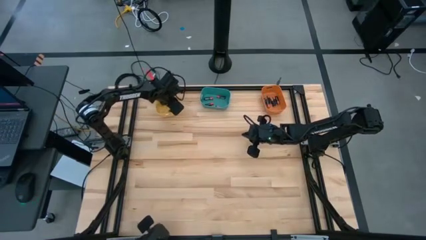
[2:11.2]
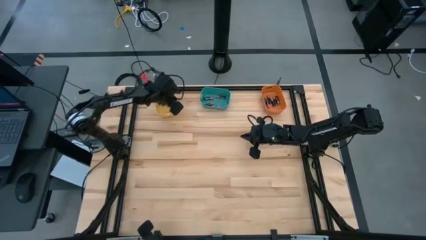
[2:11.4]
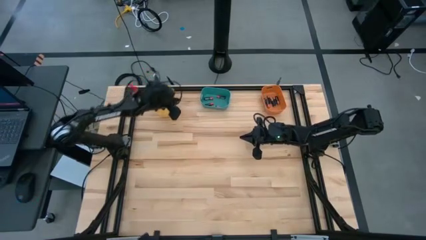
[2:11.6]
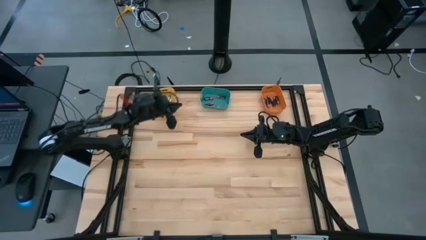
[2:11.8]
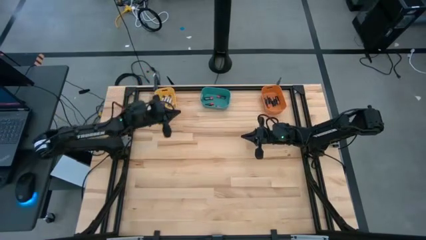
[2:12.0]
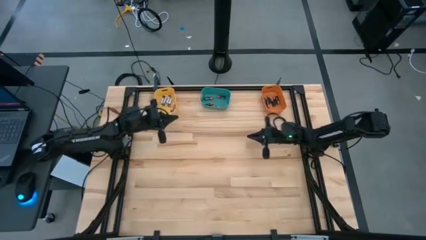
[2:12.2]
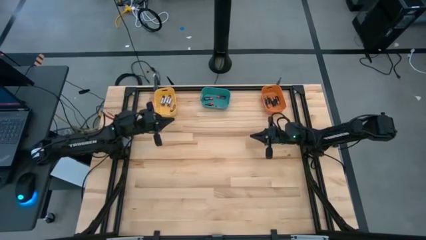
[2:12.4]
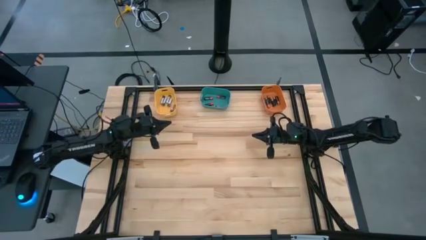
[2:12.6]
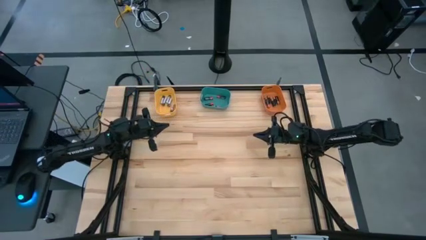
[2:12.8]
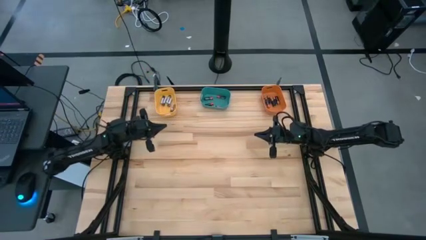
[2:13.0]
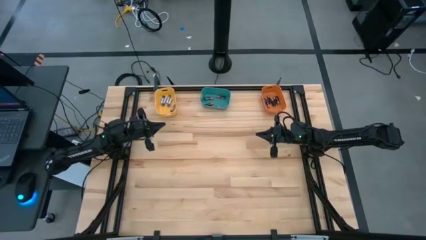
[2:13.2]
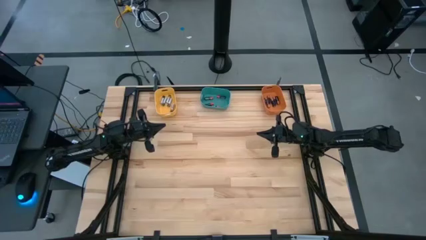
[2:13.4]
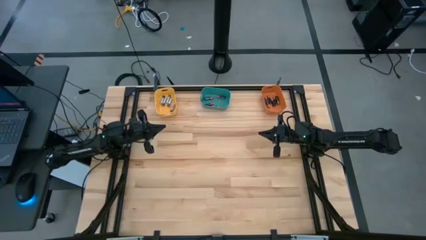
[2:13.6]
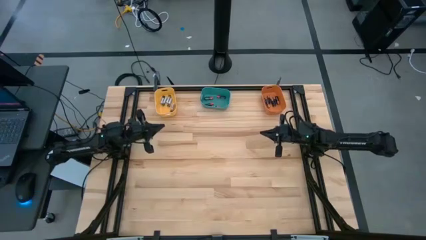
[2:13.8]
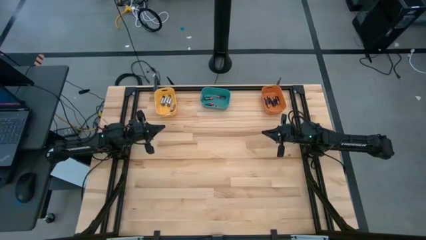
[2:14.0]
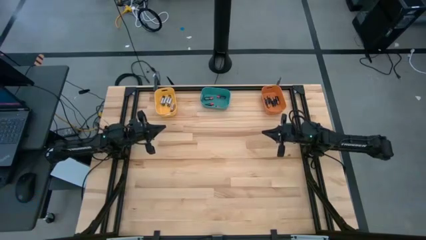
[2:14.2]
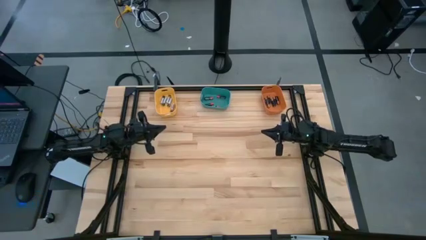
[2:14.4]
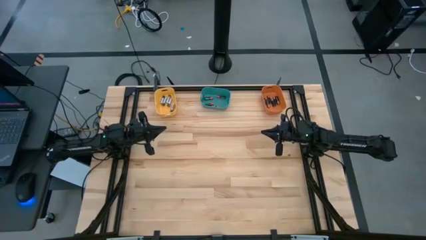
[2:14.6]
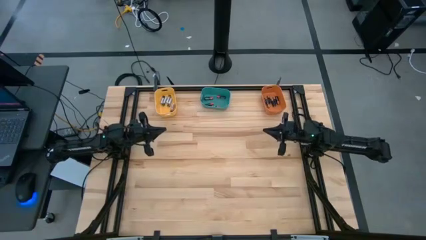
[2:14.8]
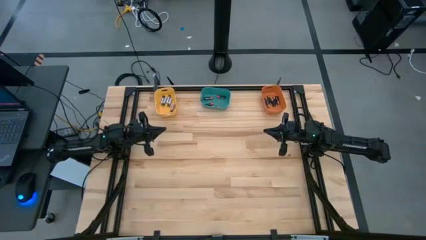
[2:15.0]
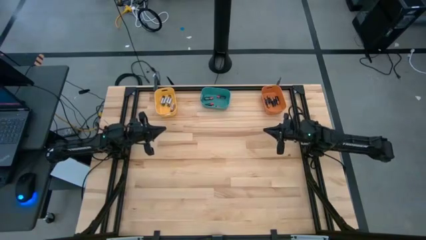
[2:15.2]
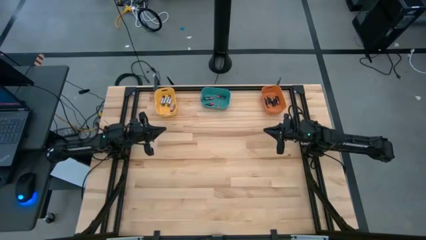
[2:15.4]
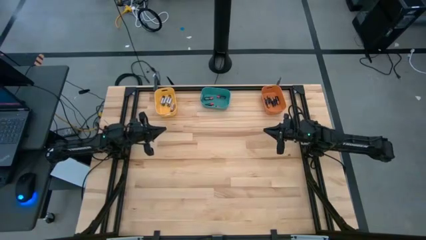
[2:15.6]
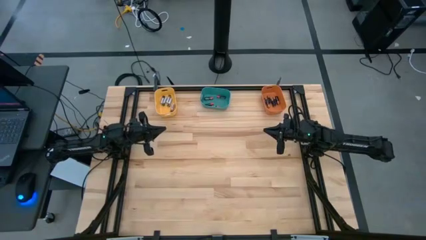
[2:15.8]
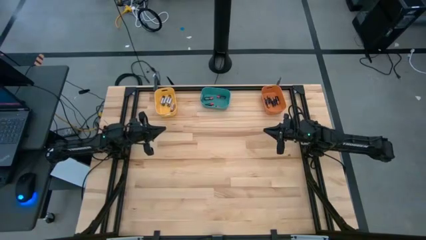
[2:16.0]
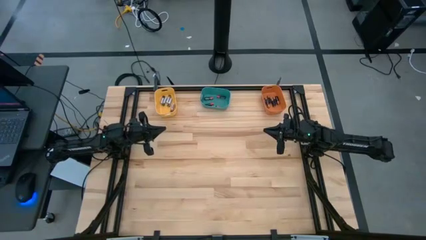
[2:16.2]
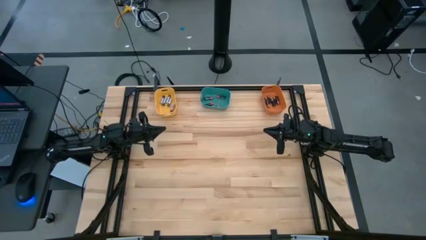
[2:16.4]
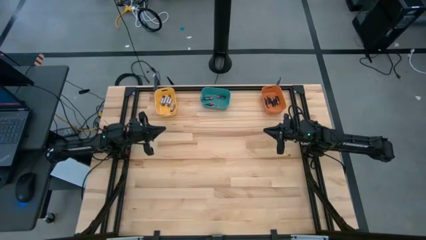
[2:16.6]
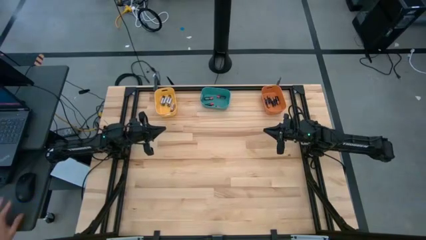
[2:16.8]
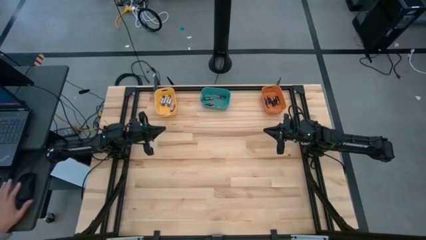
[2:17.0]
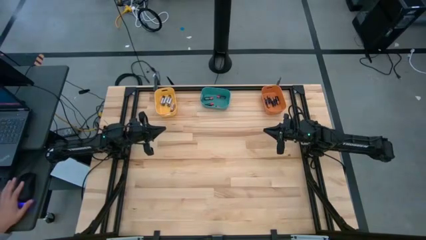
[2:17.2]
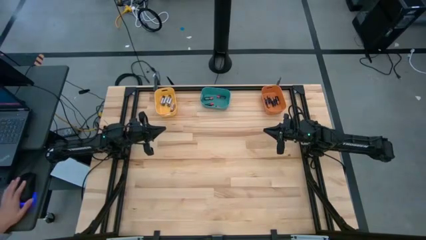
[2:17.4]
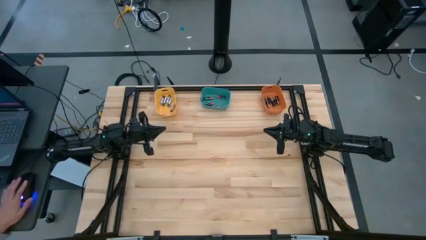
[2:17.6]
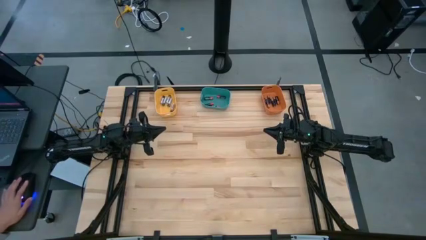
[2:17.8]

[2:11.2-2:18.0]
Task: Sort batteries
Return to Home Position

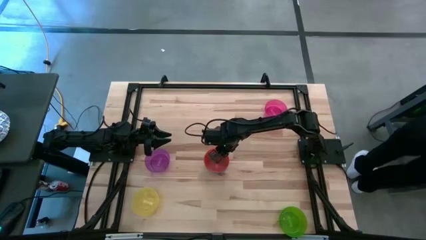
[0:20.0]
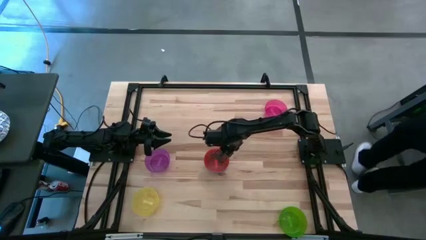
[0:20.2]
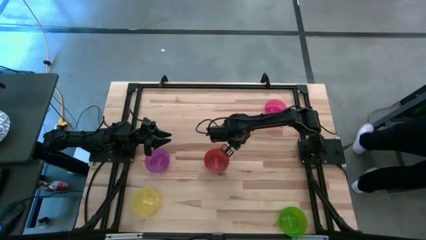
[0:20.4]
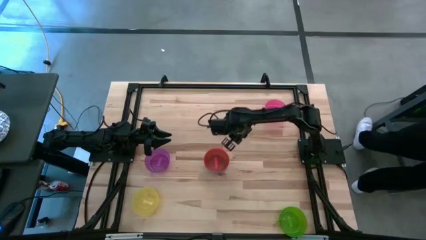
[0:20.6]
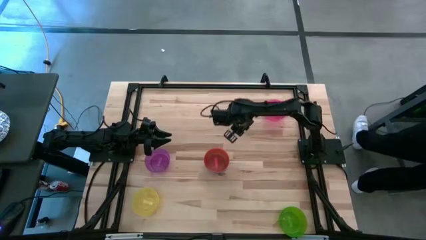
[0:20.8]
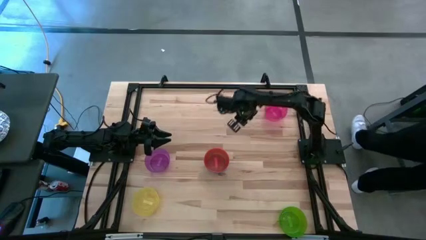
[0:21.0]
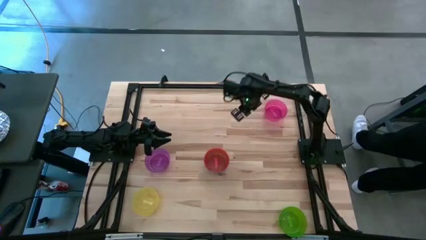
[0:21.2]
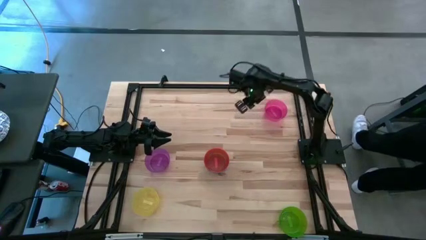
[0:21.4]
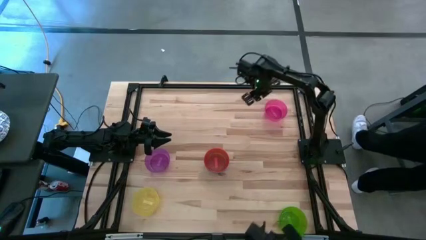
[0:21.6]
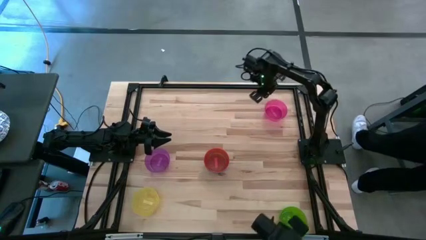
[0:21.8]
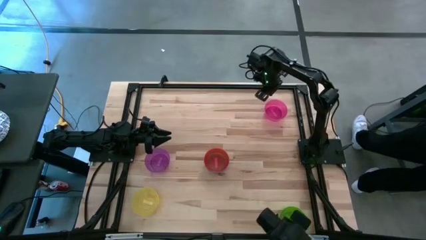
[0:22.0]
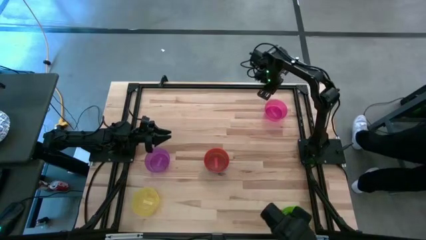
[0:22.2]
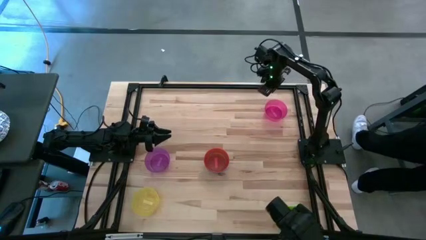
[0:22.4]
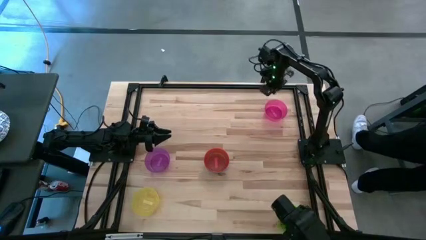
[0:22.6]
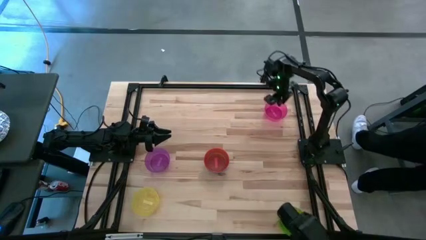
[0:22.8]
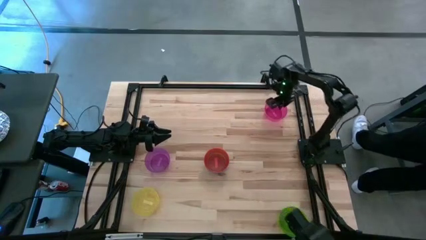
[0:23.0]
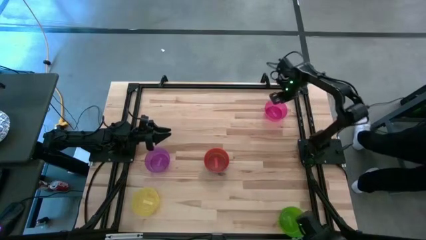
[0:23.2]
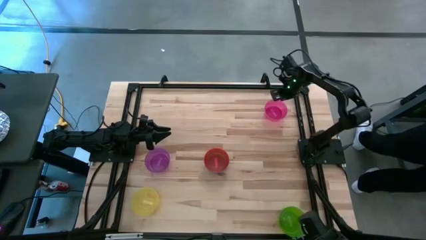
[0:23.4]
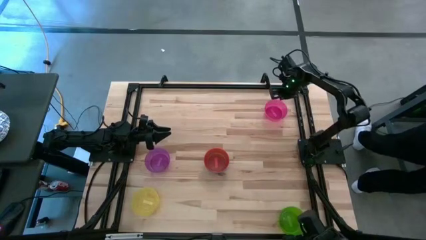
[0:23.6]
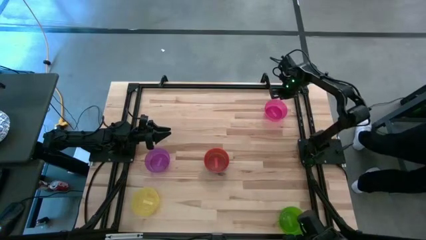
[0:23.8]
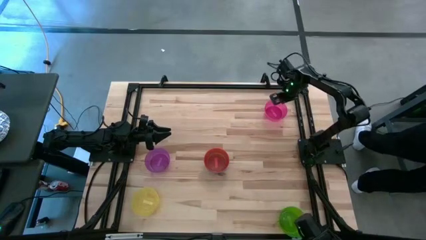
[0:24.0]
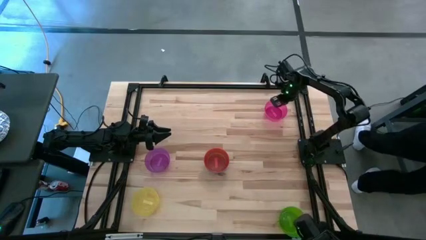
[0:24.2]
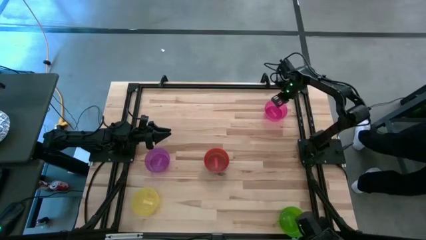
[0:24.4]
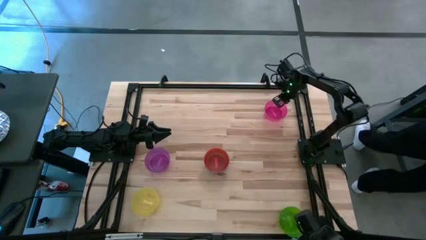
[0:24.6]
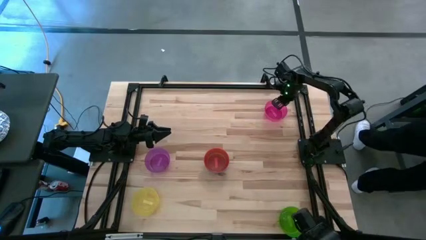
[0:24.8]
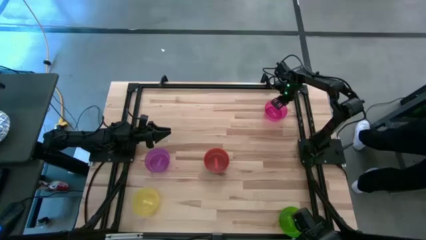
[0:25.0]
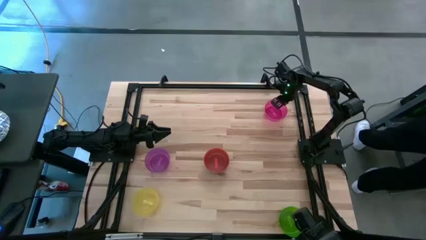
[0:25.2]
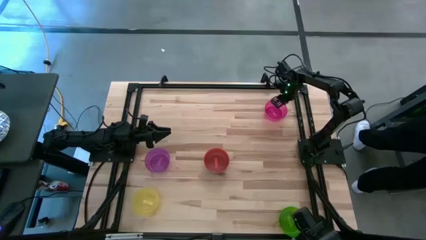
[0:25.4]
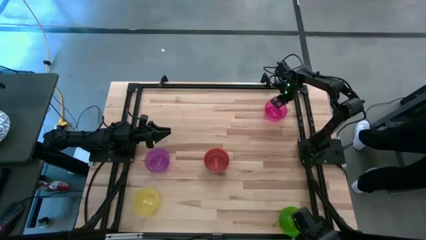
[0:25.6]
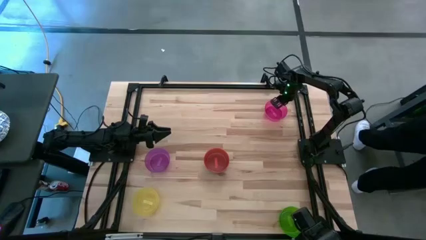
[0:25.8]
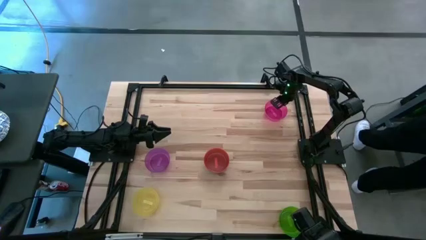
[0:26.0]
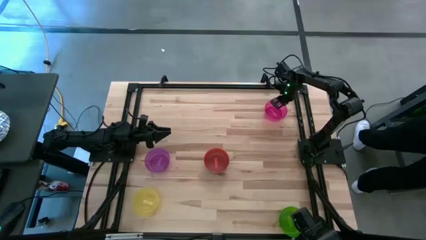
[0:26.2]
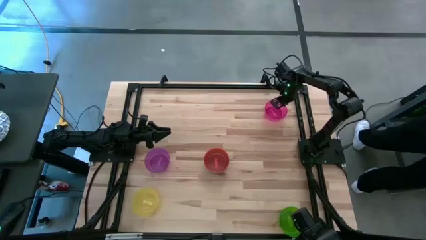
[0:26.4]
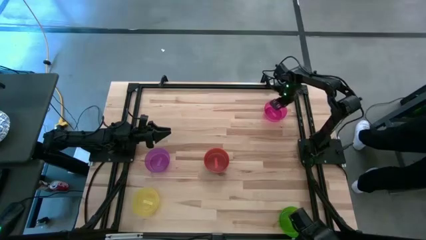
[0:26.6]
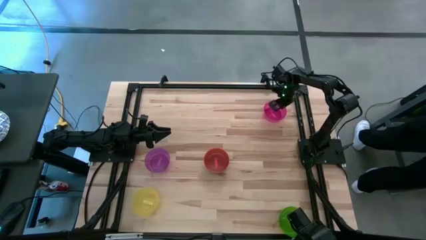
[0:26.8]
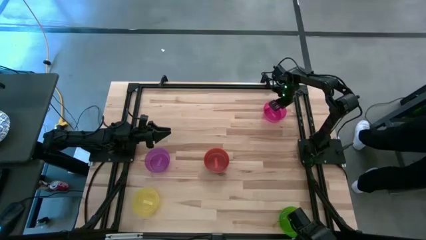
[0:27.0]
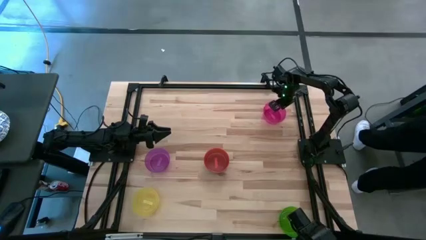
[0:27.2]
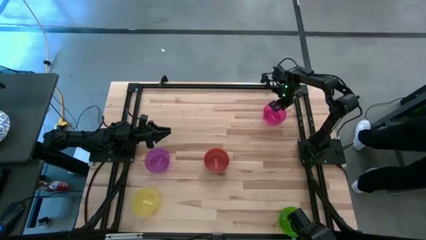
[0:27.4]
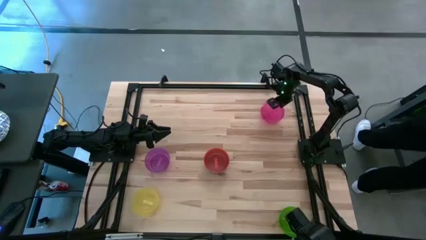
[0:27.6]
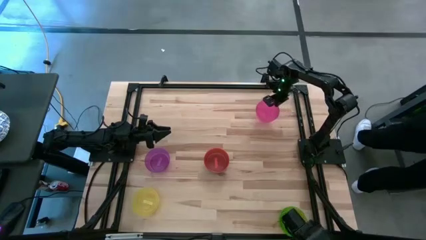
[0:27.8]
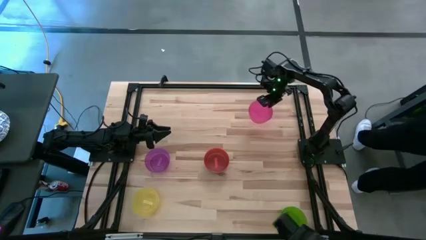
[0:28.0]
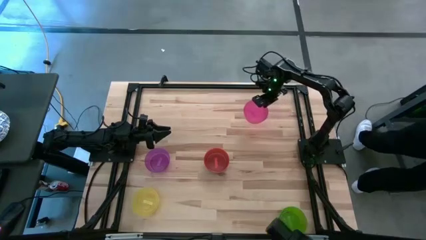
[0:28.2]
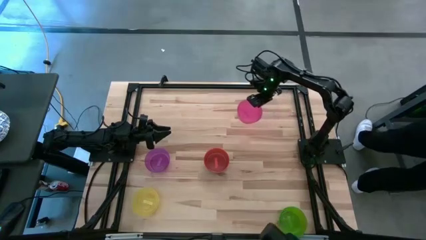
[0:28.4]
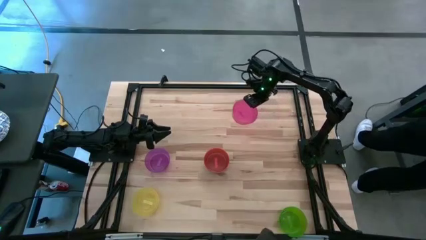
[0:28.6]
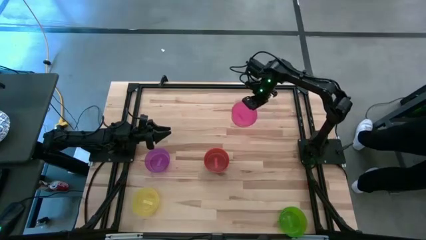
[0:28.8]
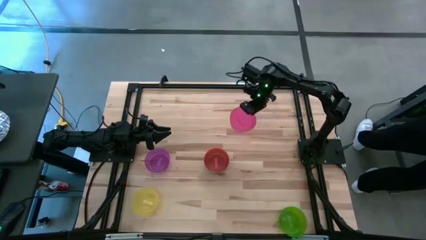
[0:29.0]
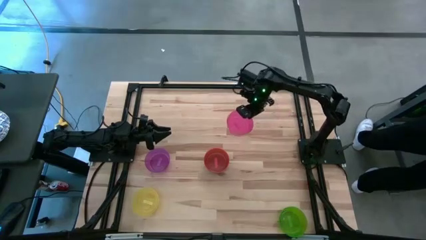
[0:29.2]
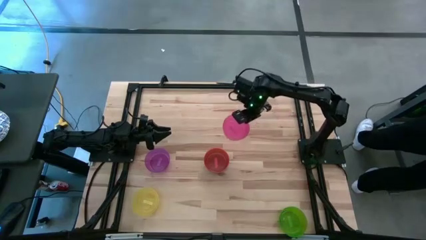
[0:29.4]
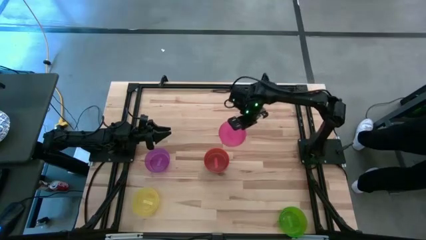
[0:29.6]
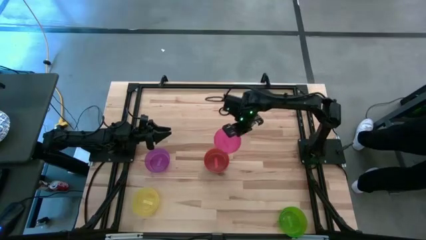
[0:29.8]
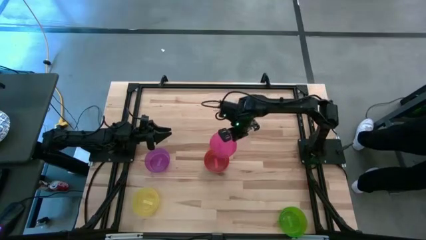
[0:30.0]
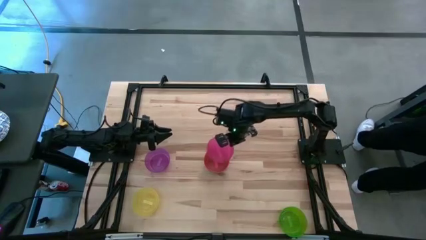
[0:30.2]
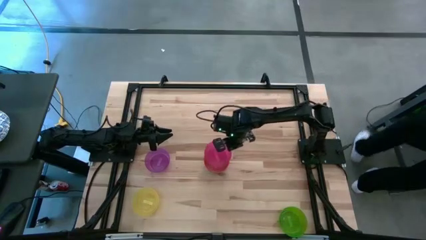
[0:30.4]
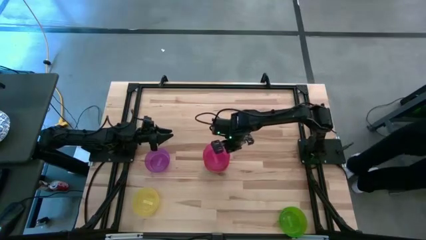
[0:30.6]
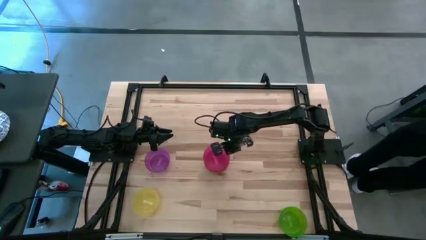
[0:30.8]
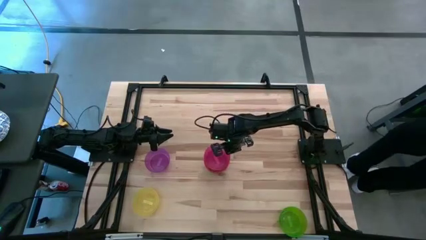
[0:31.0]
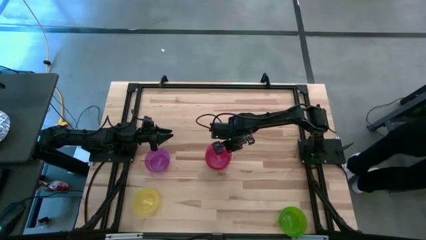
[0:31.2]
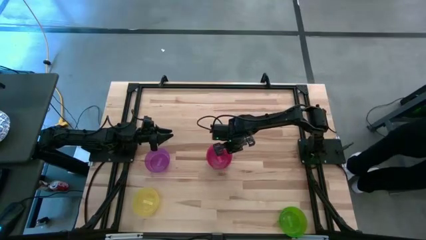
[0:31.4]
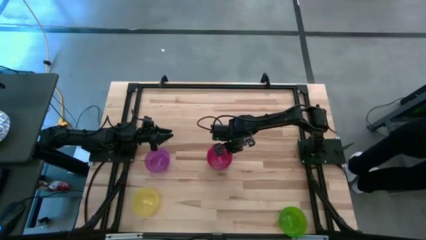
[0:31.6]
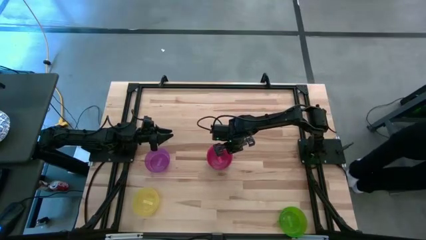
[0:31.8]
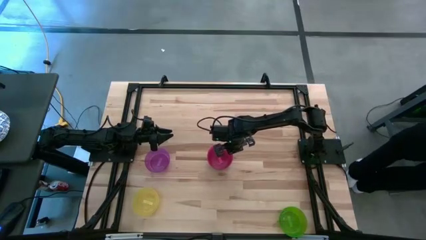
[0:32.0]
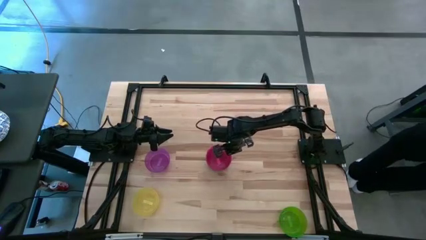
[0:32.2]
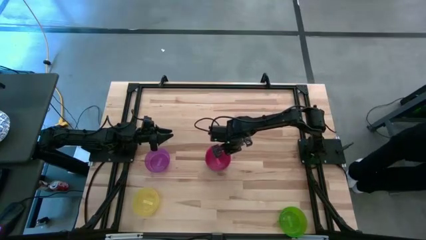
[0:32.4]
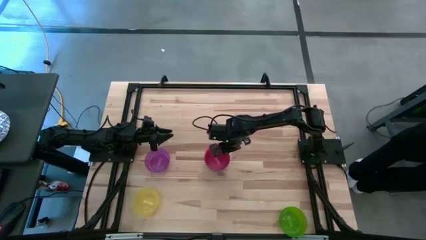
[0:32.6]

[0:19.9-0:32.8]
Task: Nest bowls inside each other
Stack the red bowl on top of the orange bowl
